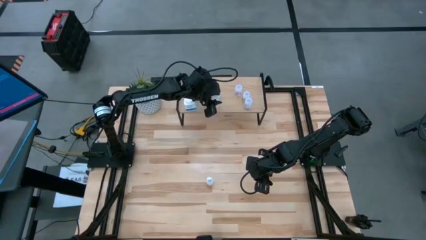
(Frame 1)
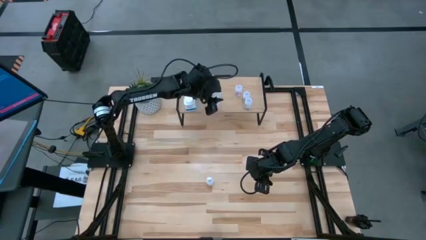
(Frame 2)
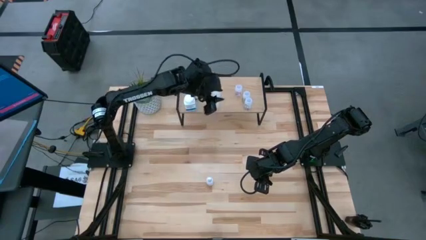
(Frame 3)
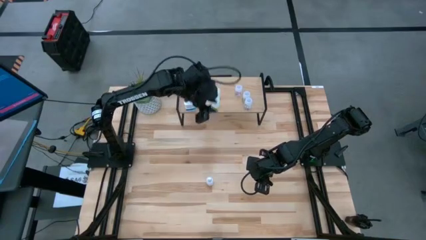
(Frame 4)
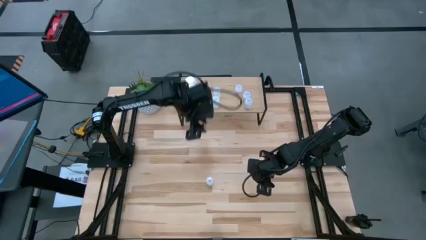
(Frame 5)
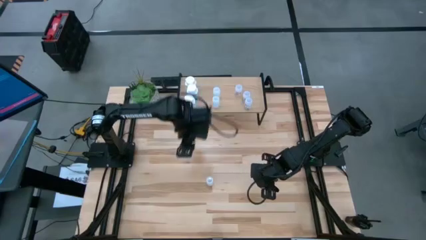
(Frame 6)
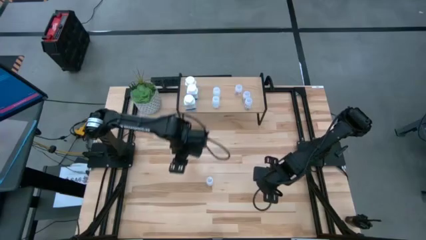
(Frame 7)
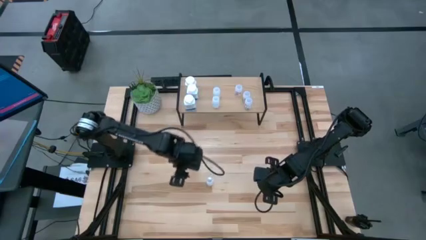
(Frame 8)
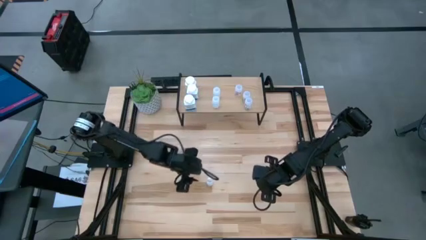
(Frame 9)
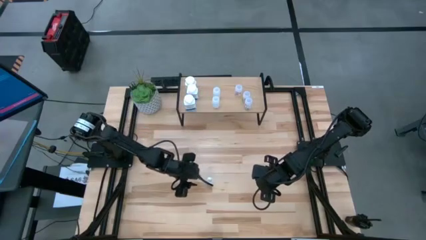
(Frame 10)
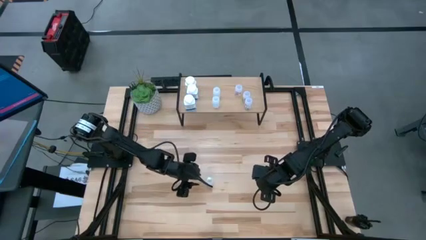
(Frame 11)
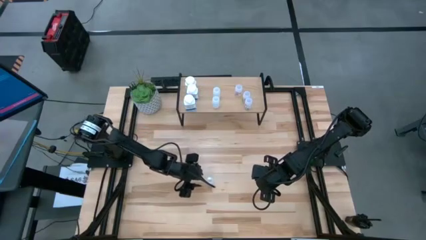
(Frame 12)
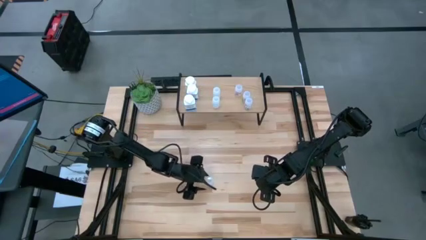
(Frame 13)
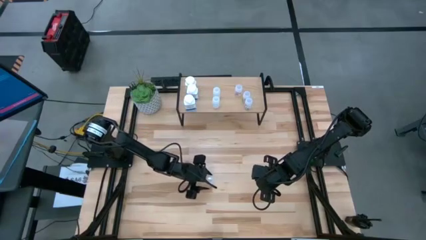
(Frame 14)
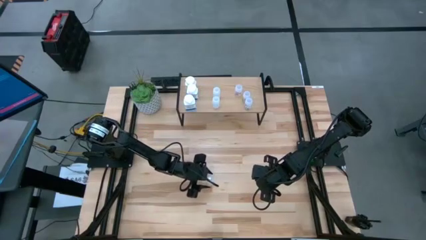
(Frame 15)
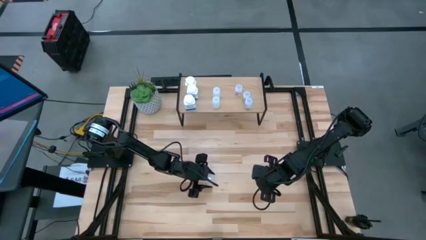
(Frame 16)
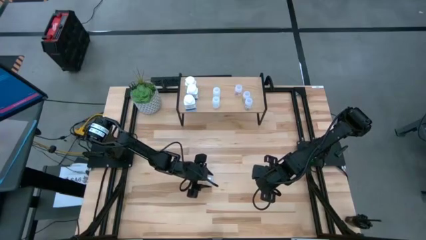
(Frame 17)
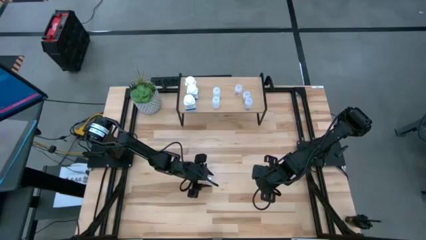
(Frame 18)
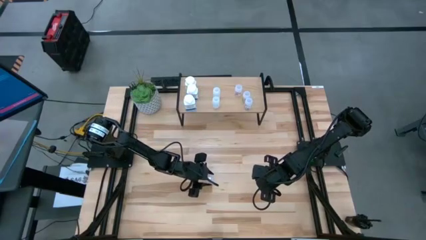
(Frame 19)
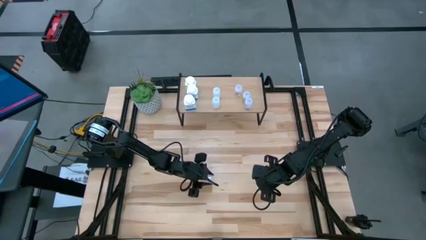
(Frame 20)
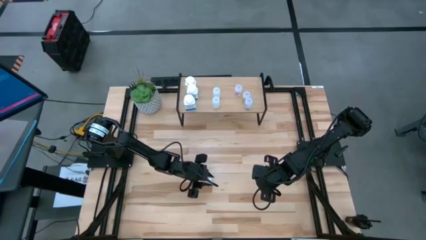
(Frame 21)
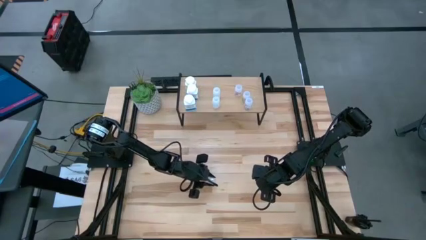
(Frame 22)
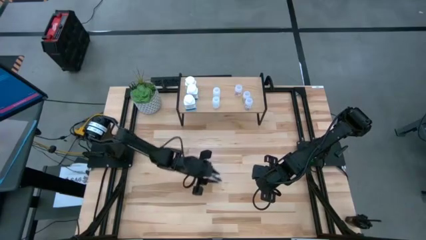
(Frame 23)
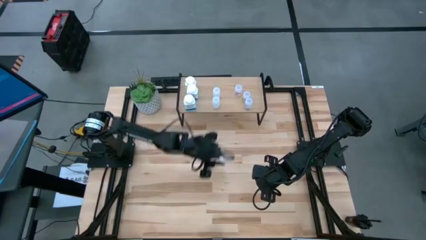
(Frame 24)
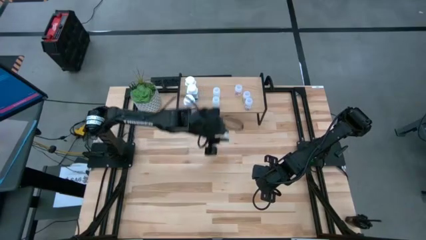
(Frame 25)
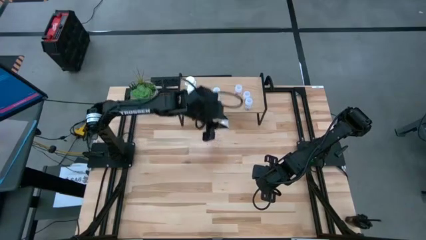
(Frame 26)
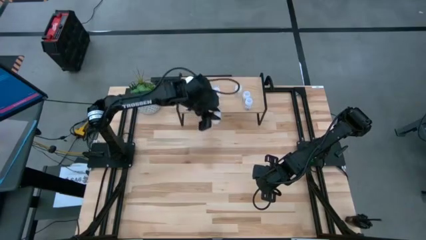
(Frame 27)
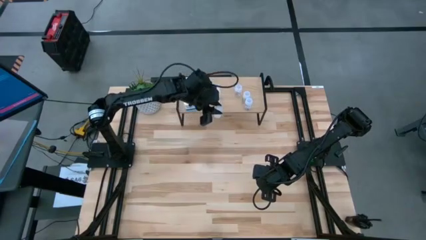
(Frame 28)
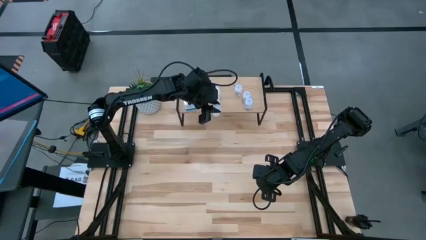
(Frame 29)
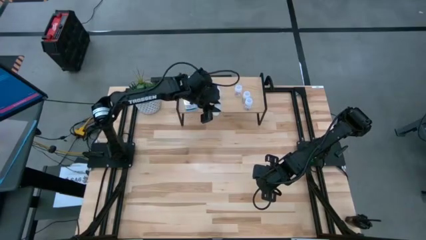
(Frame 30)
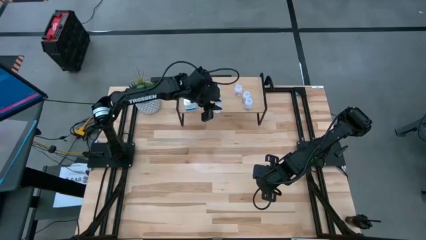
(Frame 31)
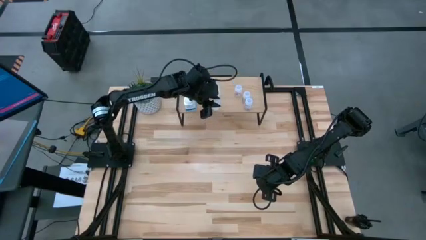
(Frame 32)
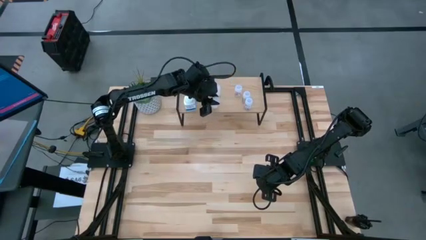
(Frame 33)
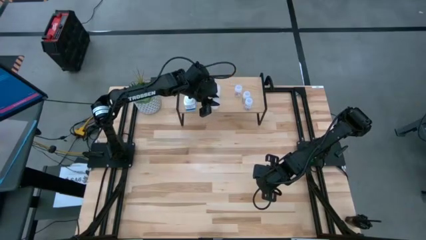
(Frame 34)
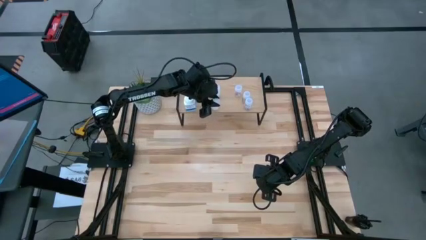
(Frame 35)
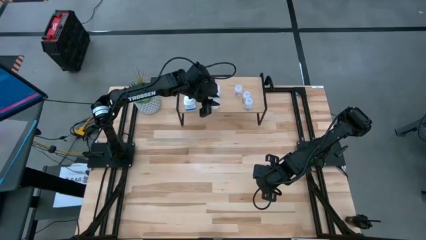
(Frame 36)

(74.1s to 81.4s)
Task: Pick and place medicine bottles onto shelf by color
Align the white pill bottle with the other white pill bottle on the shelf

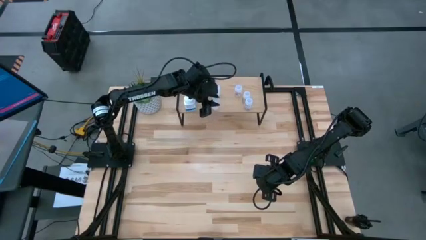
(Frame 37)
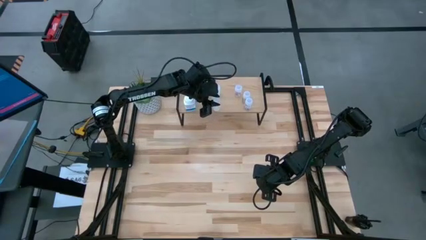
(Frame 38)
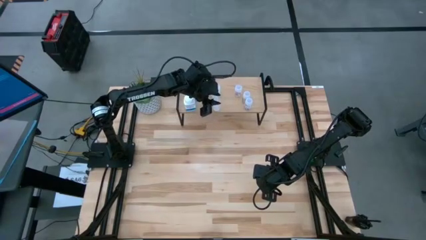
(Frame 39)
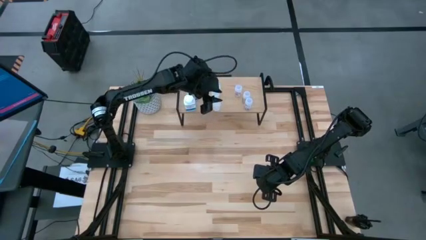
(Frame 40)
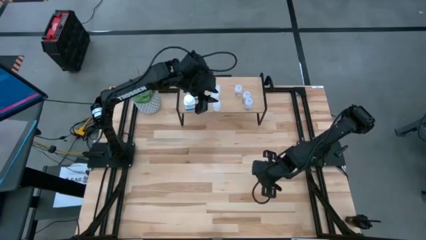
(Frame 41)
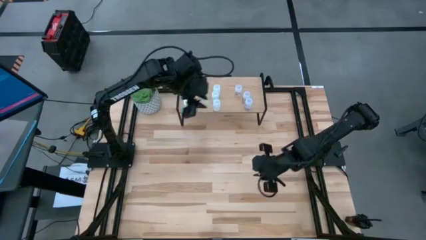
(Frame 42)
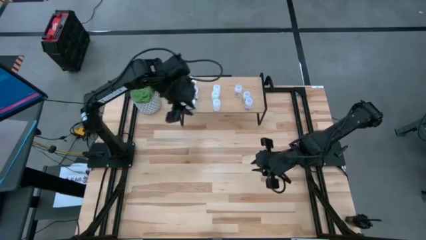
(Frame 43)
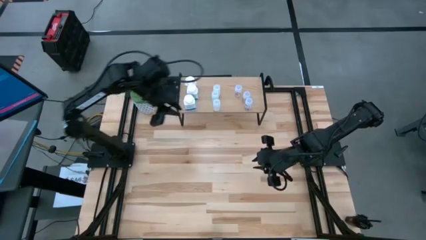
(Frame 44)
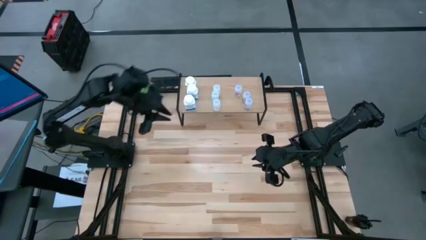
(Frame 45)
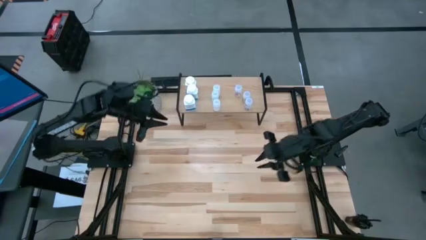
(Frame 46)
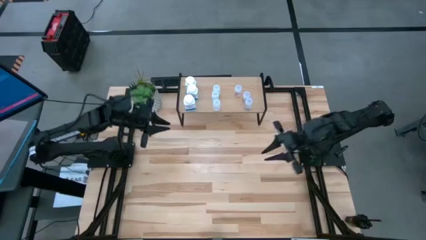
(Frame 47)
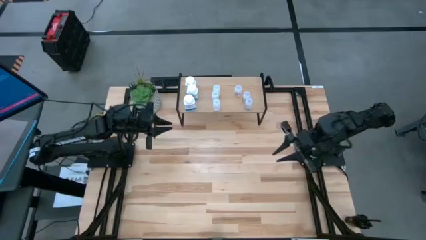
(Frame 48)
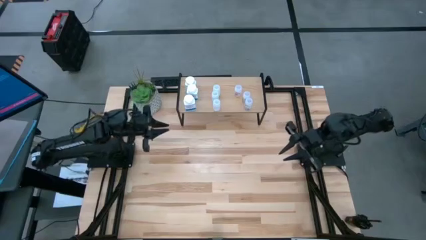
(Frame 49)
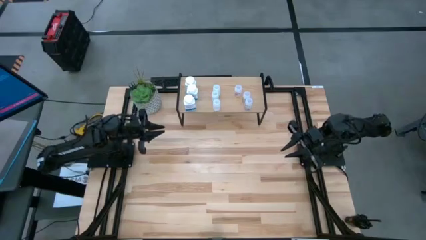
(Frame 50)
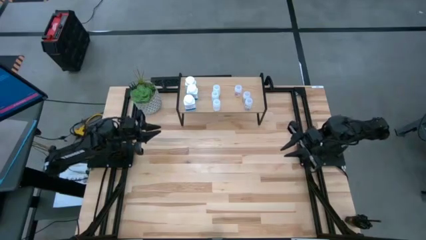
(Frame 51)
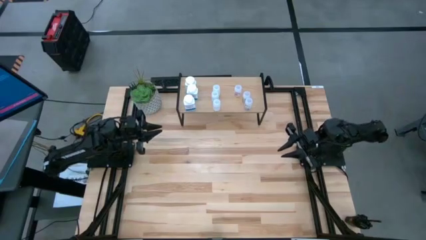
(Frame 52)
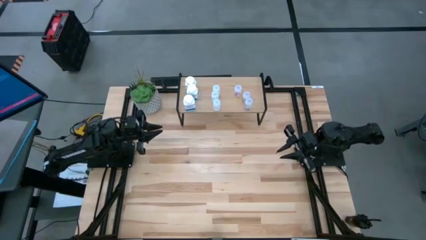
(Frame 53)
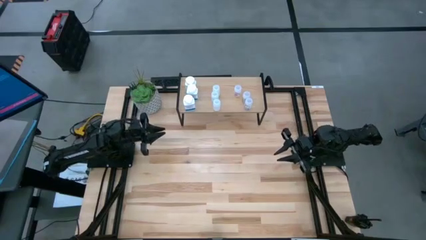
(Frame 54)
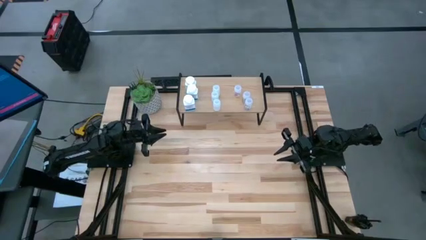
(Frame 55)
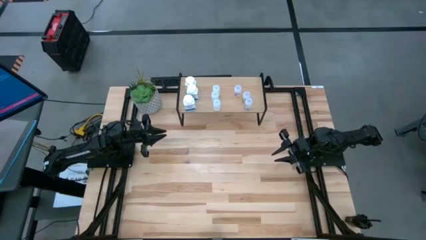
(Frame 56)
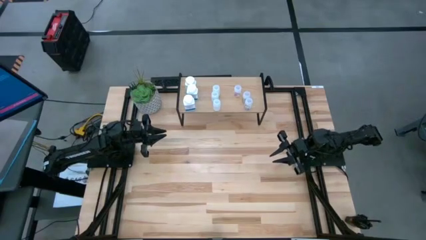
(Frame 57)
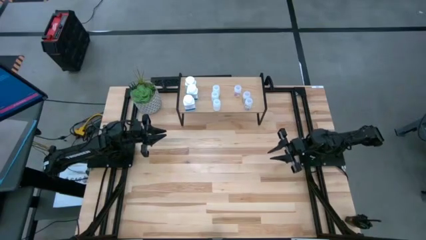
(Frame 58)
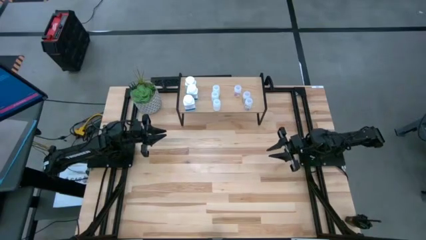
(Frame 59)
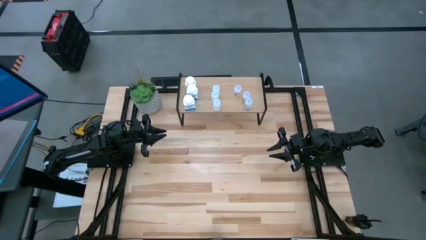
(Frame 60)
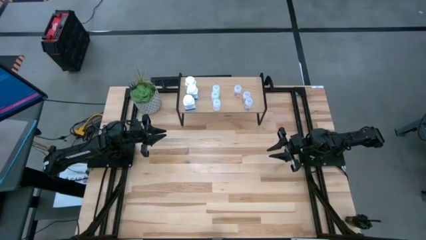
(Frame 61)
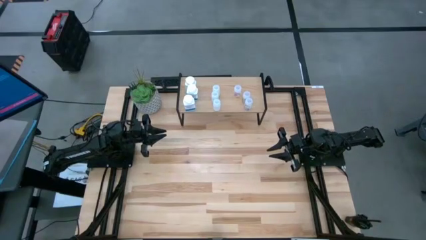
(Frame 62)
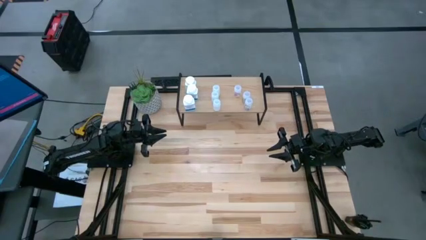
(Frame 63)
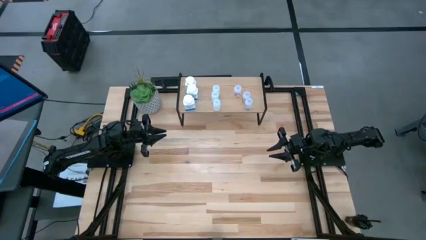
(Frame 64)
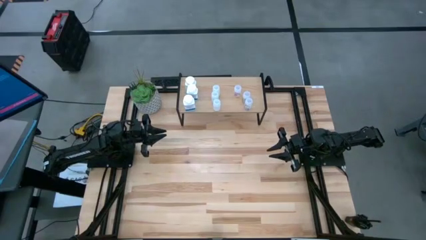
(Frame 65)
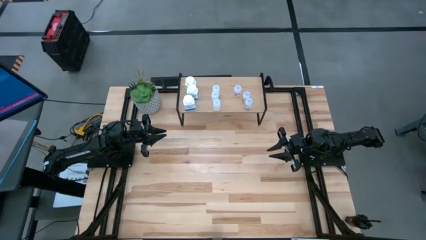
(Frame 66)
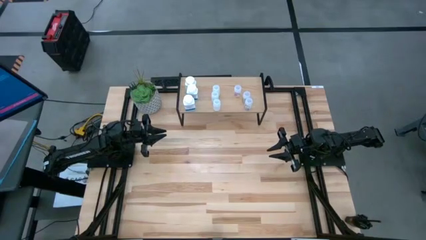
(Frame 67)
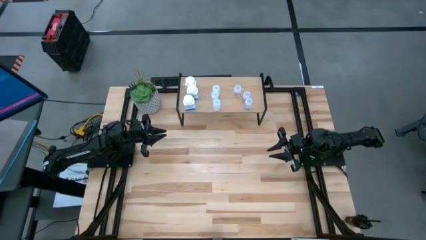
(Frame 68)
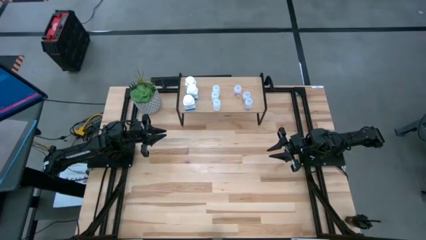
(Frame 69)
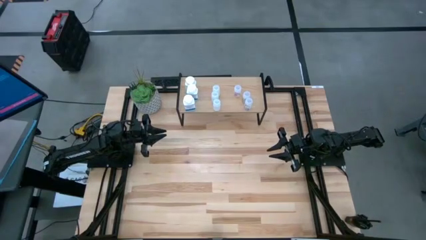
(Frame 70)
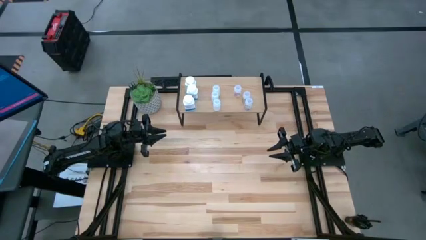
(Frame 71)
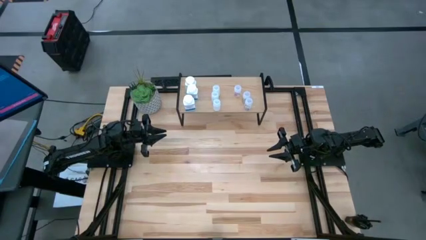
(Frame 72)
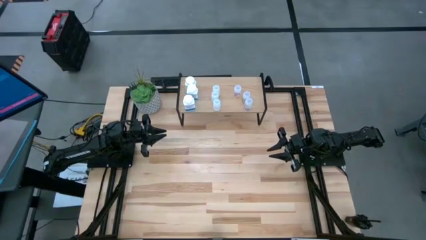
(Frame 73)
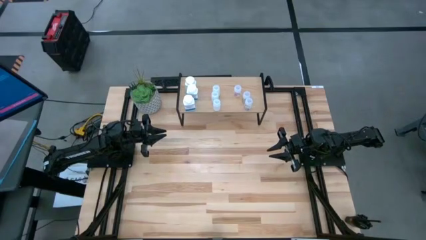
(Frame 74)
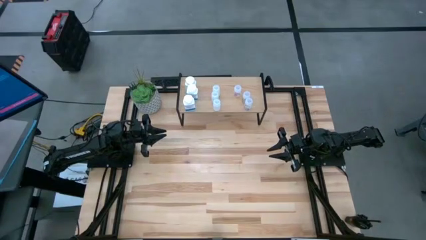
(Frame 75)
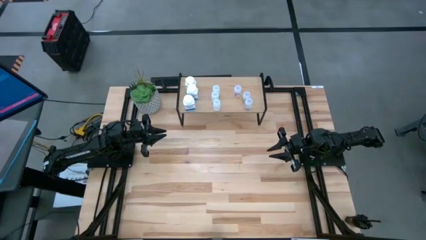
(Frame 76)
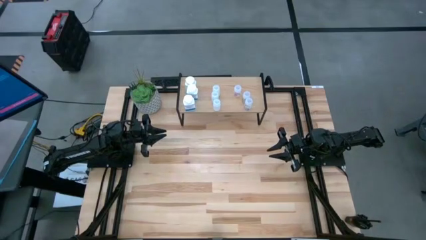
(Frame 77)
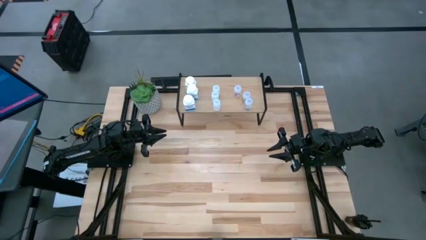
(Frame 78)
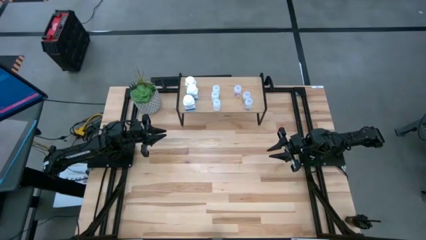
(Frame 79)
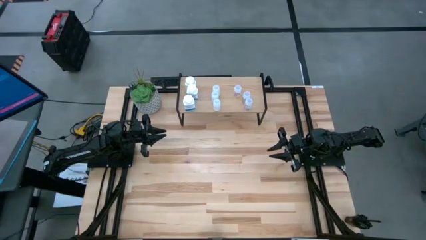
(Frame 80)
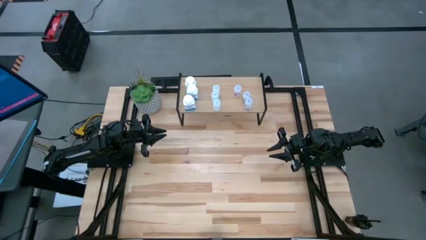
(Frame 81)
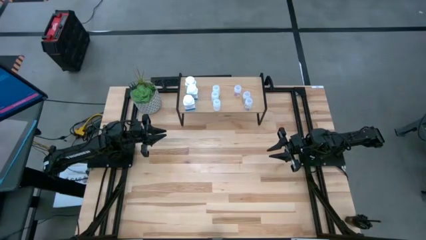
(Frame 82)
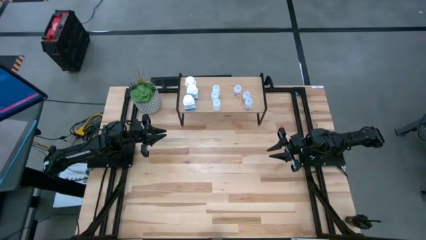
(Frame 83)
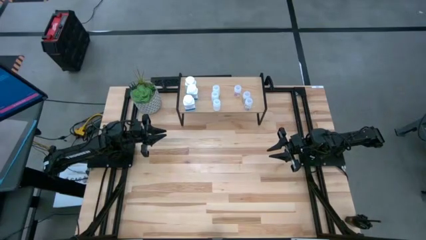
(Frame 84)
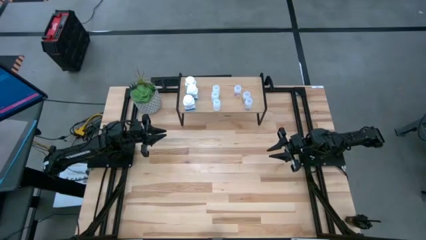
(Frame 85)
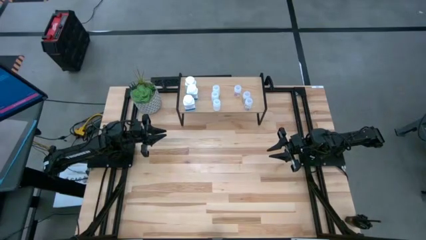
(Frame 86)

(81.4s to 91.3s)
Return to Home Position
